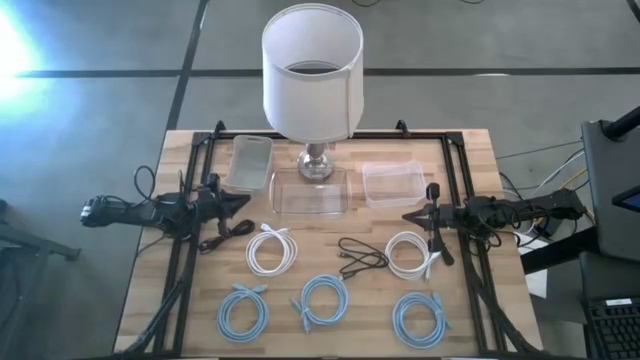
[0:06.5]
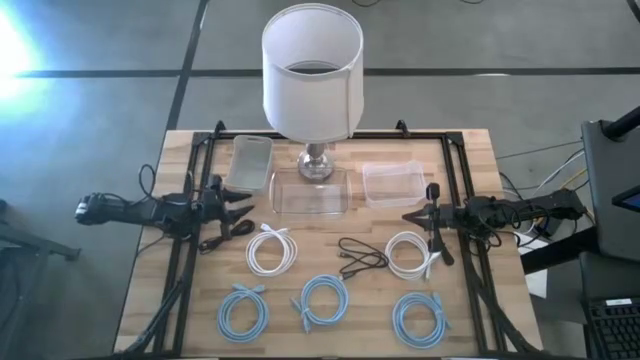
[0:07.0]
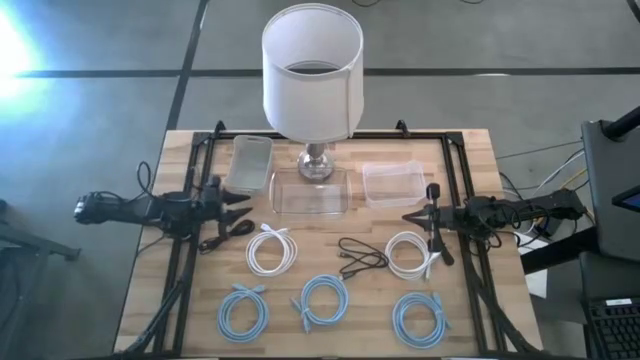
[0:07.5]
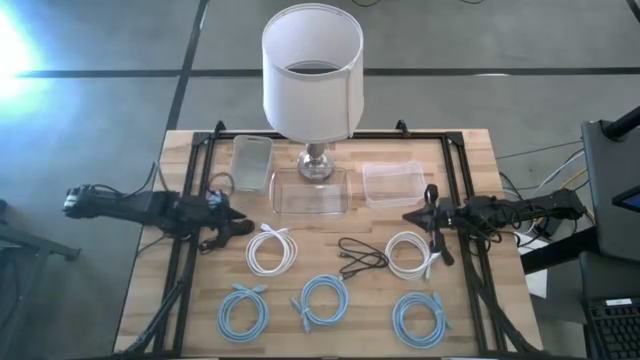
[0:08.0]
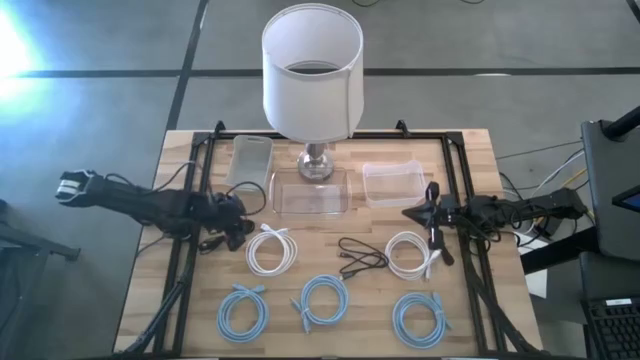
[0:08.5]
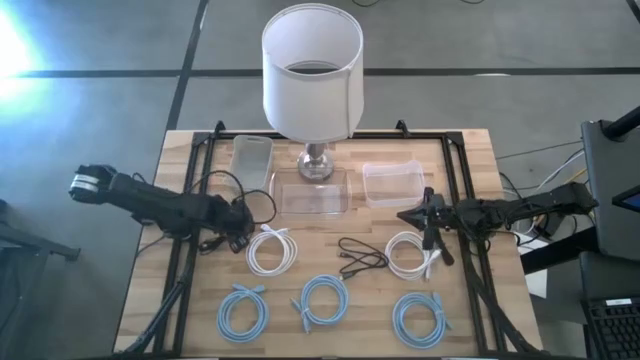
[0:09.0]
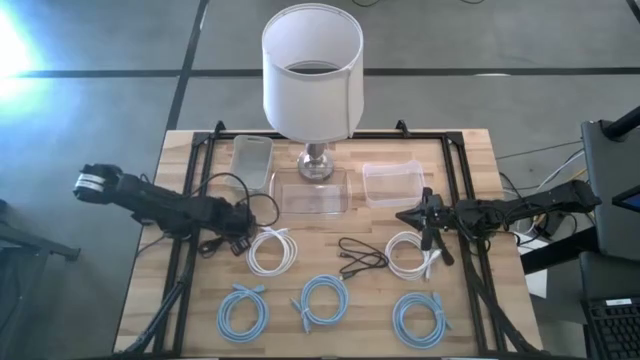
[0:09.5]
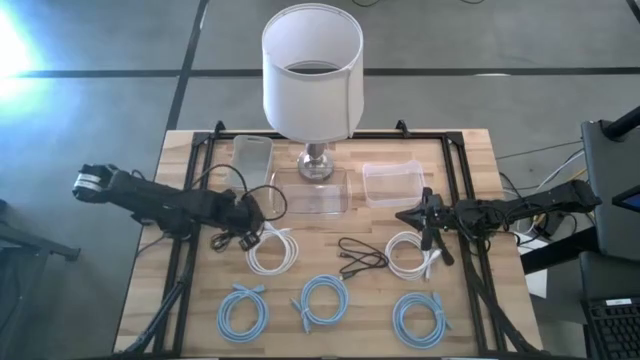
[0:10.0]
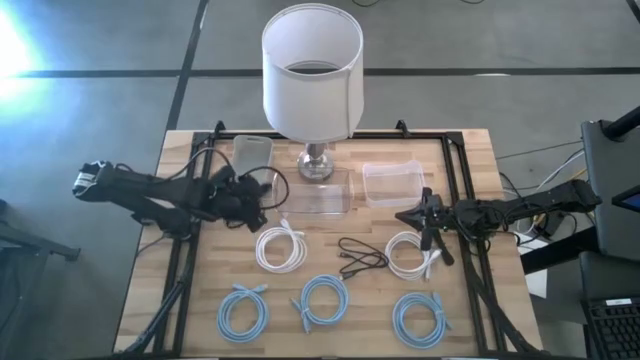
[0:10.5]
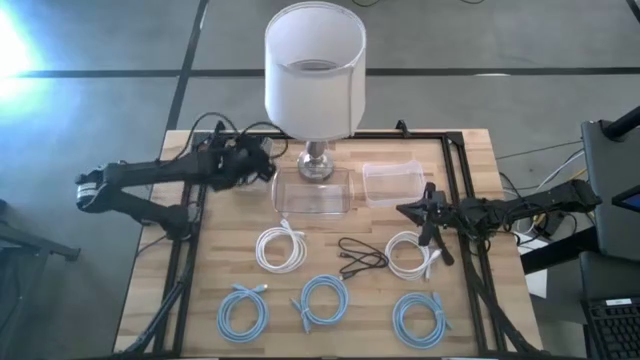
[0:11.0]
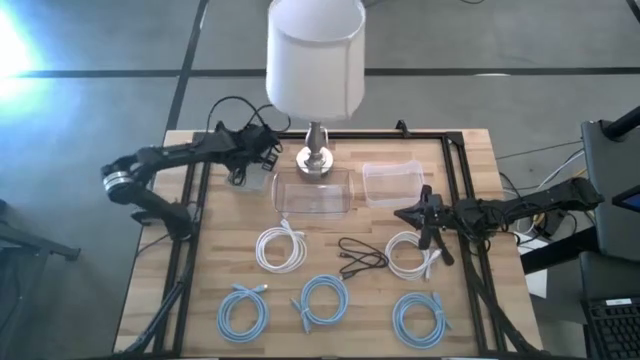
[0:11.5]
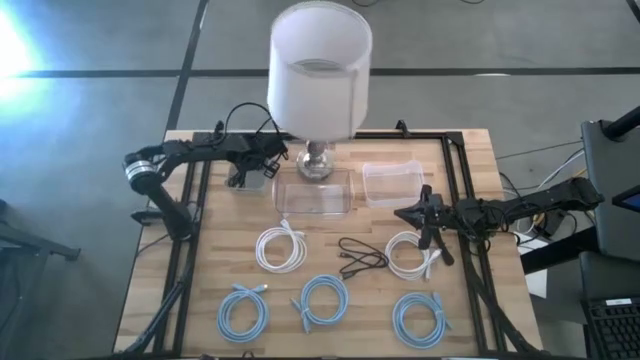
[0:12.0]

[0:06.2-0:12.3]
Task: Pick & Place USB Port
Put the left black charger cable into the gray bin

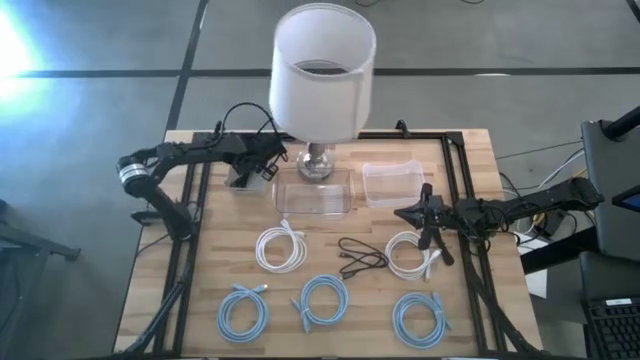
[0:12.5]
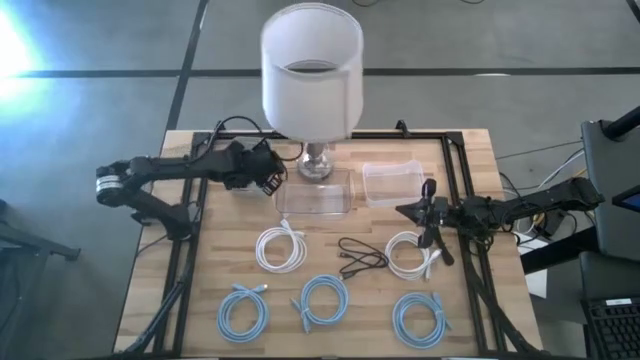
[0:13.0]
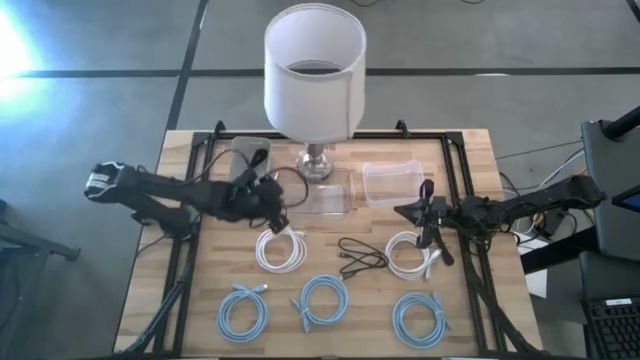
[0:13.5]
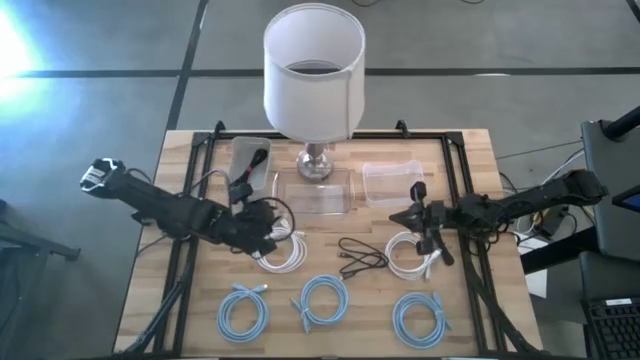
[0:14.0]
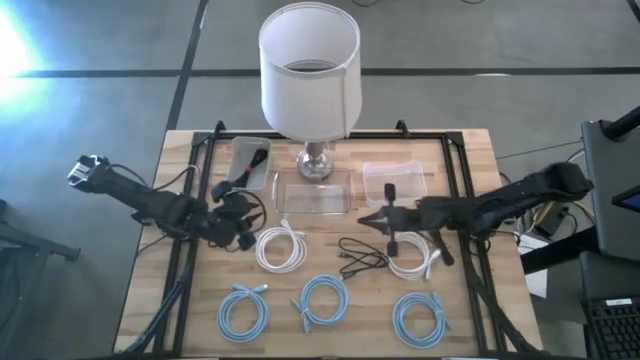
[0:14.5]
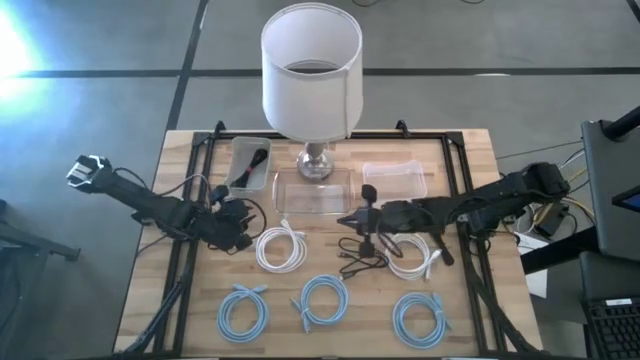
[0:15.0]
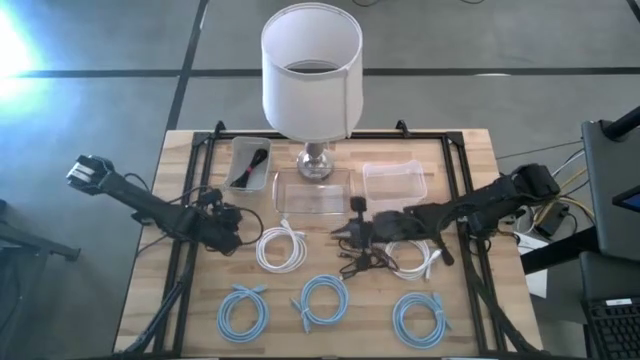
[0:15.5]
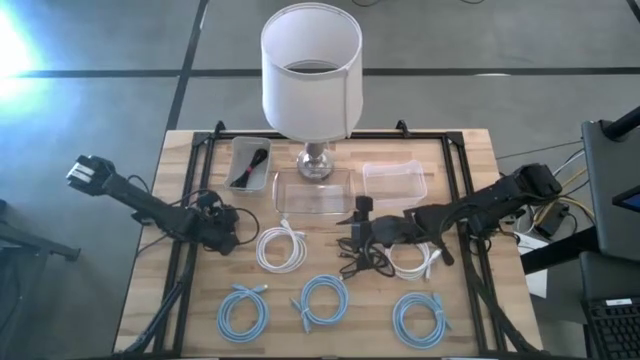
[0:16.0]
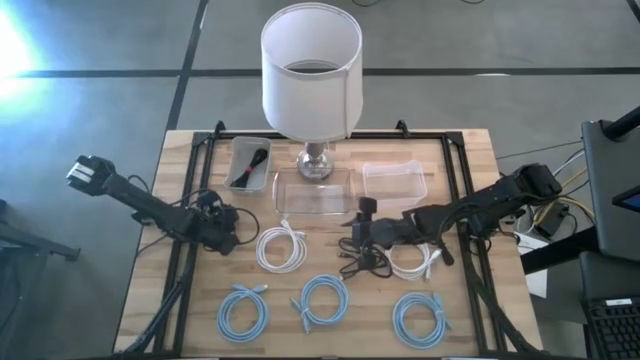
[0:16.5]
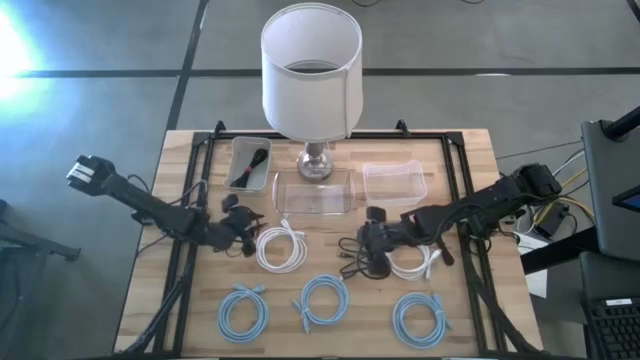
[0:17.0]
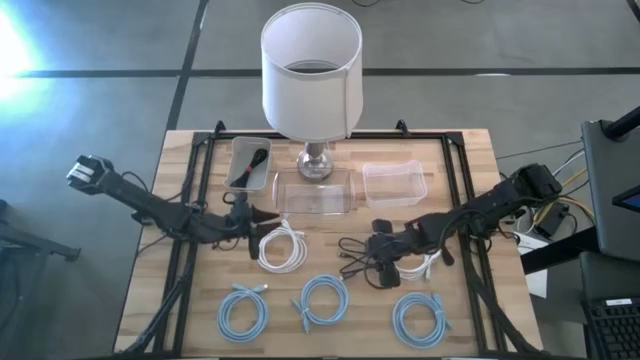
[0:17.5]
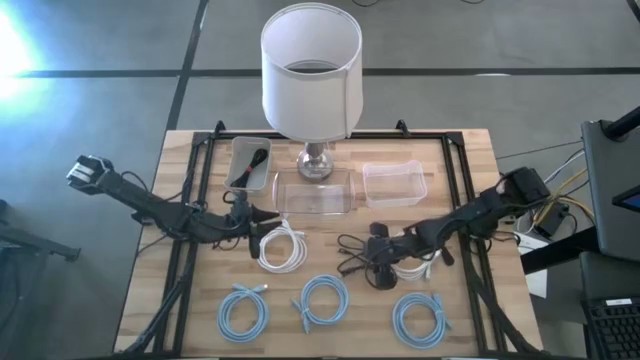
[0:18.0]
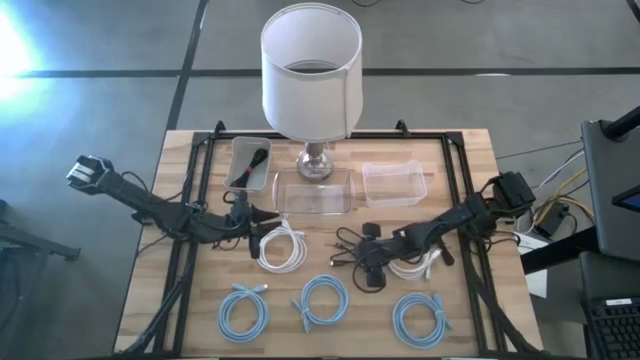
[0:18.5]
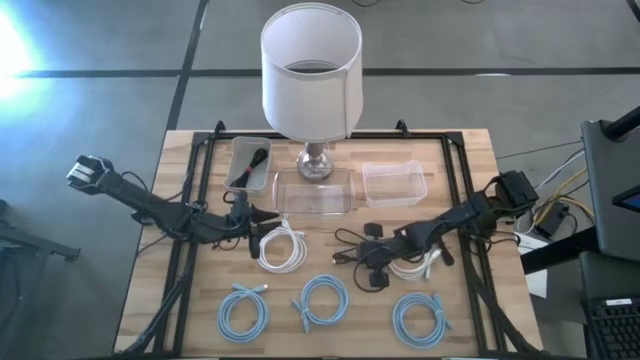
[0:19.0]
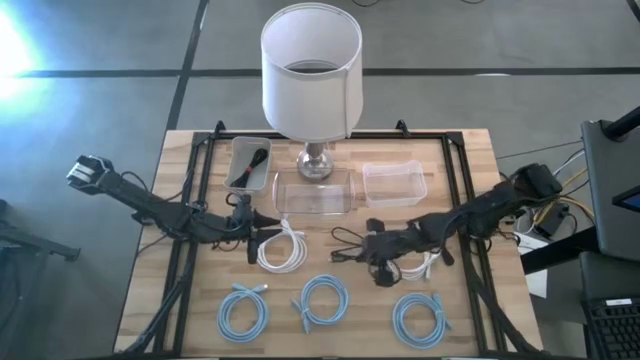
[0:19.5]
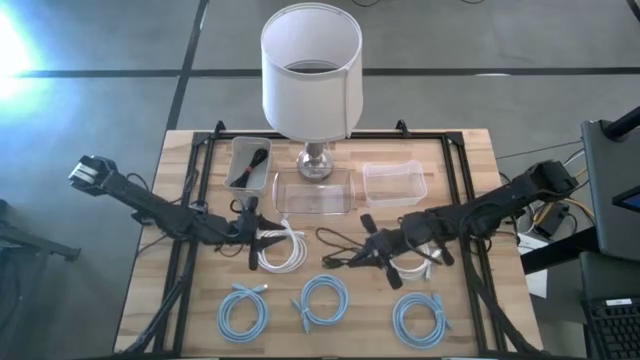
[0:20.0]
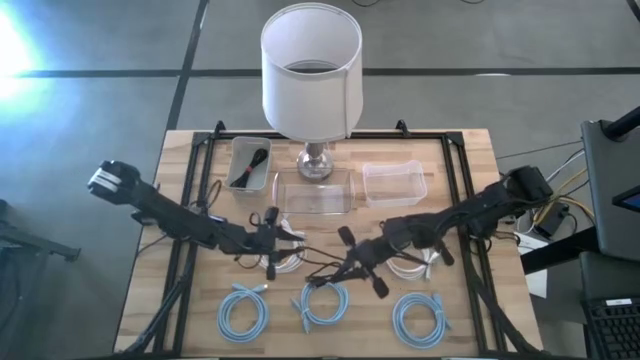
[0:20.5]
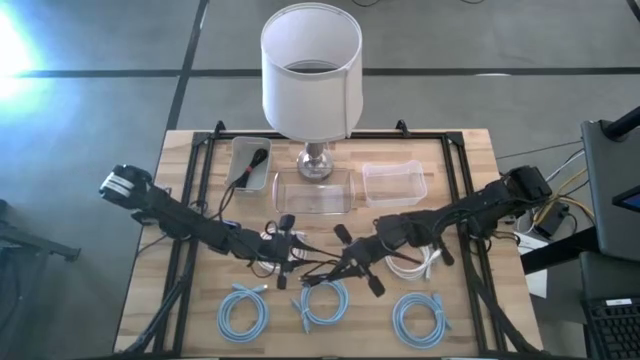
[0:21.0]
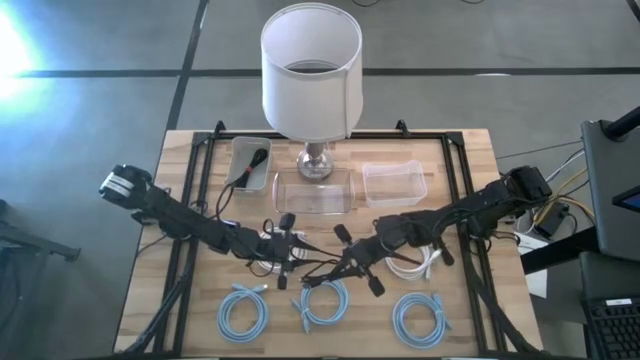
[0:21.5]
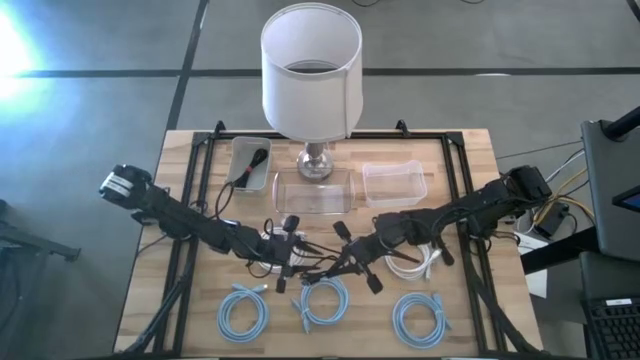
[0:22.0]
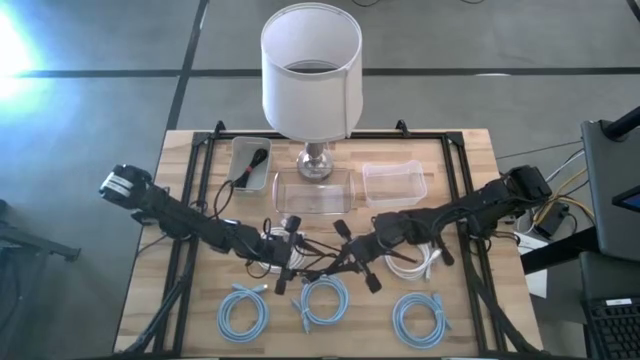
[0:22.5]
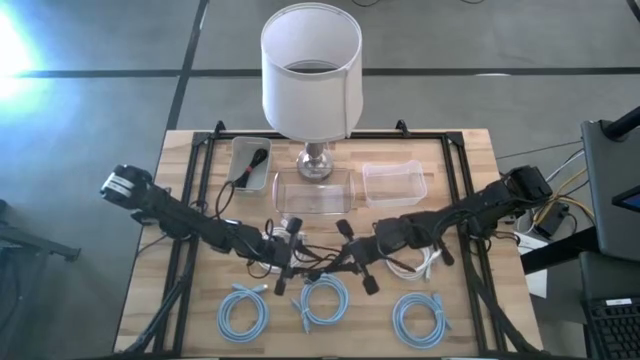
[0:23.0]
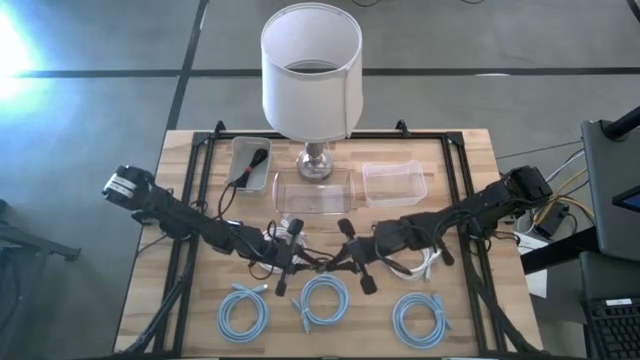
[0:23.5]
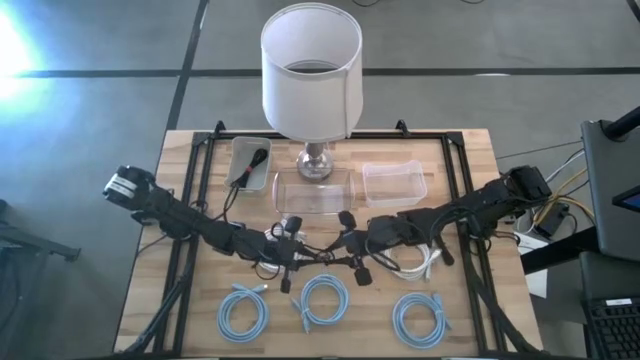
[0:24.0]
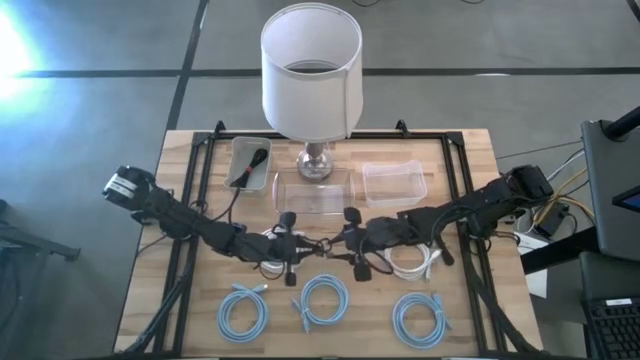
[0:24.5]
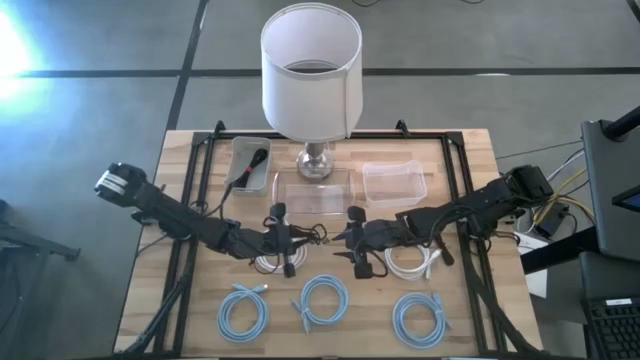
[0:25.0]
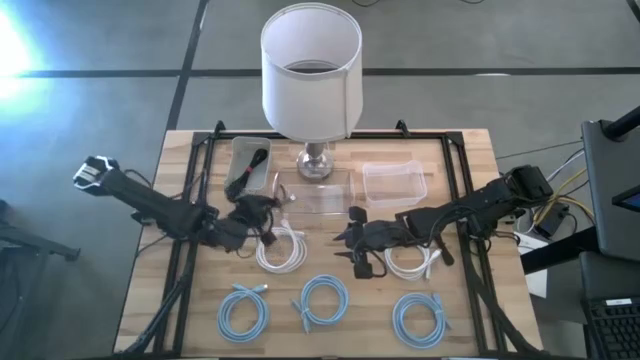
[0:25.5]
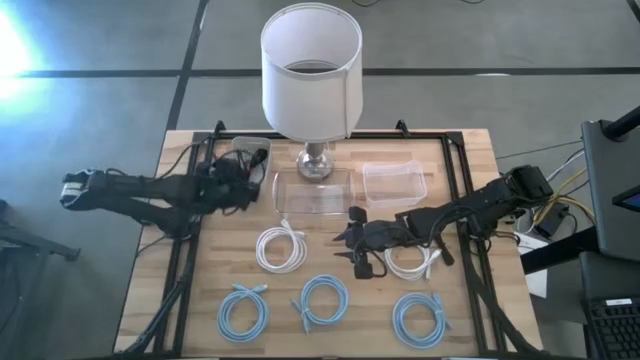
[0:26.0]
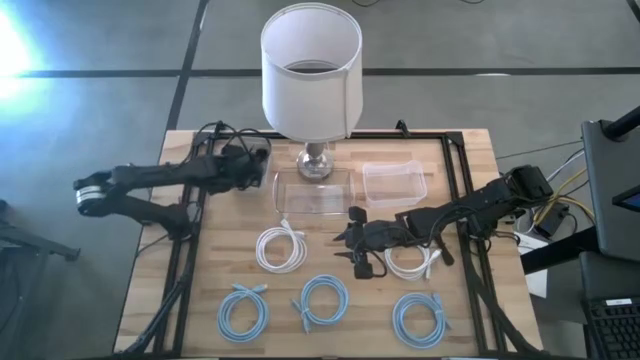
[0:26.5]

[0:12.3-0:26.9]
Put the left black charger cable into the gray bin
